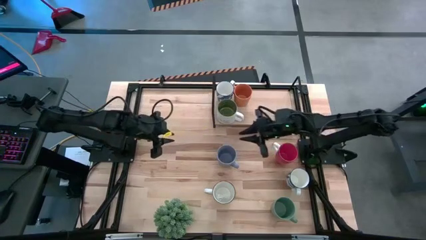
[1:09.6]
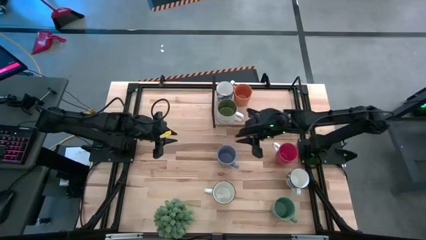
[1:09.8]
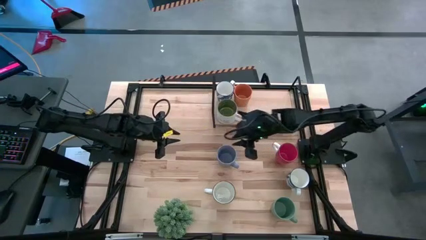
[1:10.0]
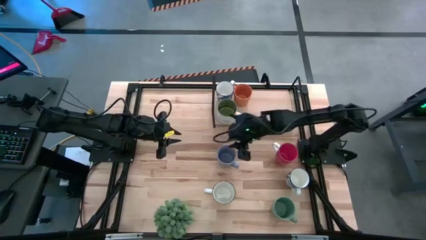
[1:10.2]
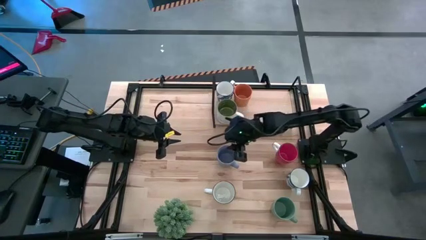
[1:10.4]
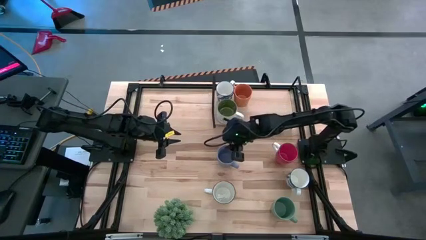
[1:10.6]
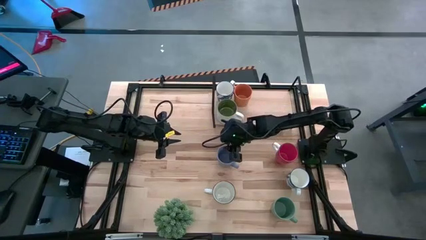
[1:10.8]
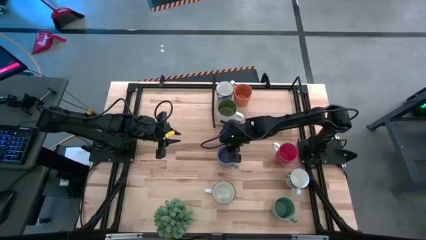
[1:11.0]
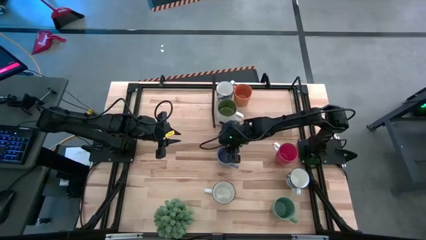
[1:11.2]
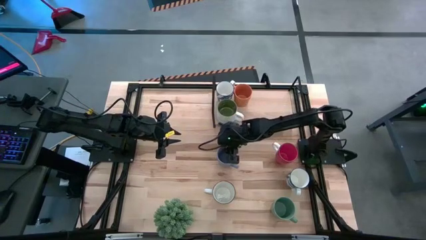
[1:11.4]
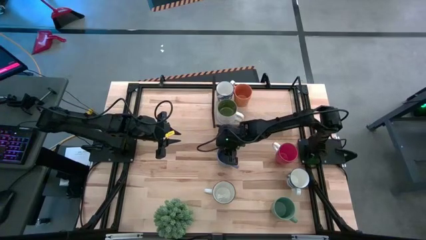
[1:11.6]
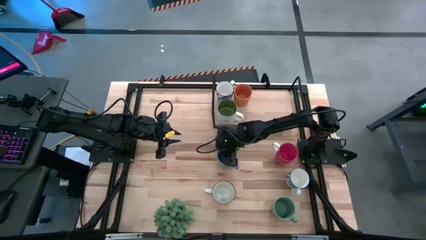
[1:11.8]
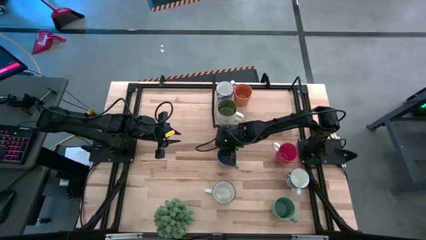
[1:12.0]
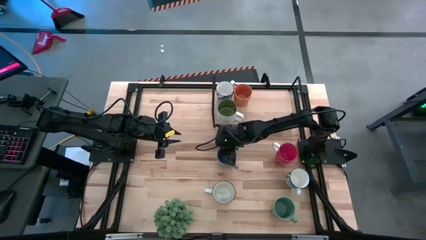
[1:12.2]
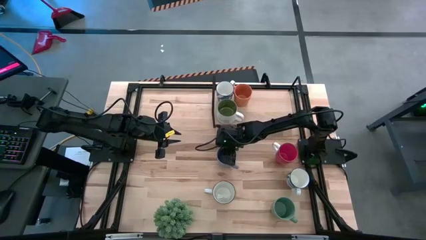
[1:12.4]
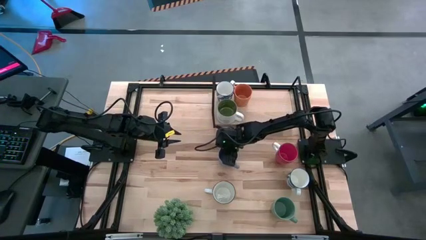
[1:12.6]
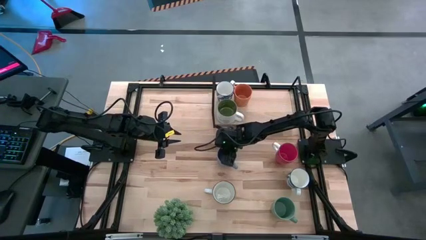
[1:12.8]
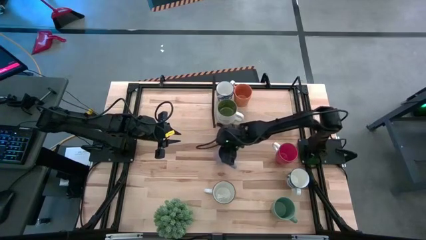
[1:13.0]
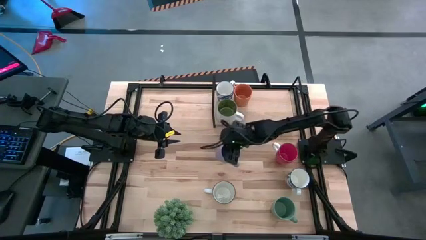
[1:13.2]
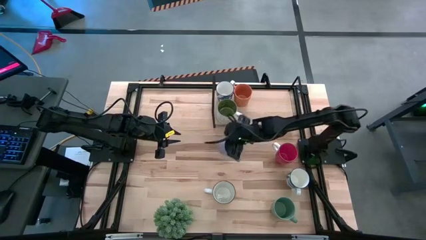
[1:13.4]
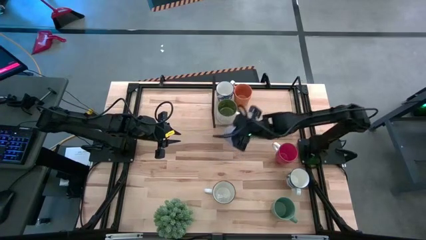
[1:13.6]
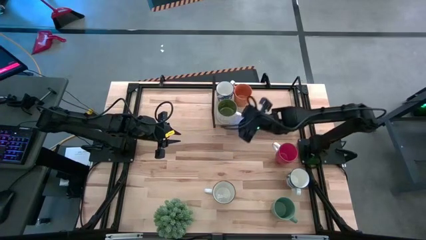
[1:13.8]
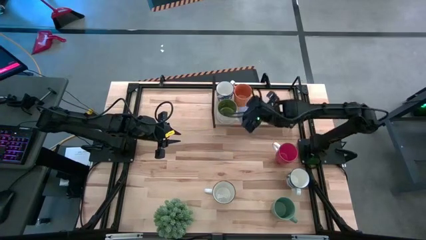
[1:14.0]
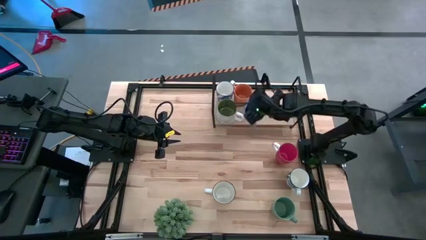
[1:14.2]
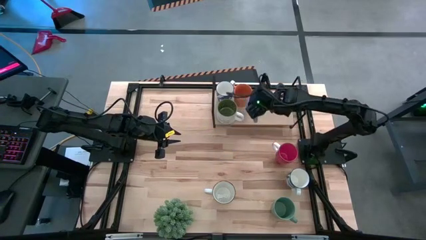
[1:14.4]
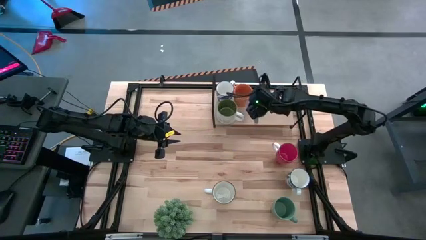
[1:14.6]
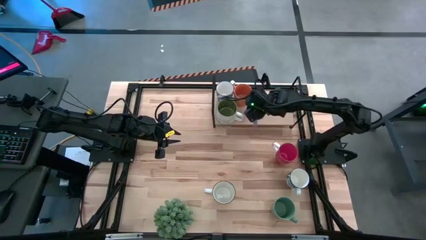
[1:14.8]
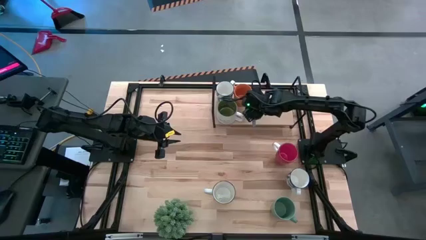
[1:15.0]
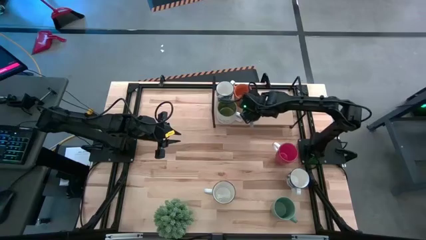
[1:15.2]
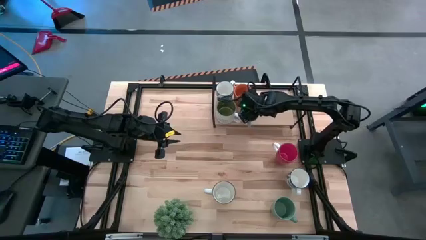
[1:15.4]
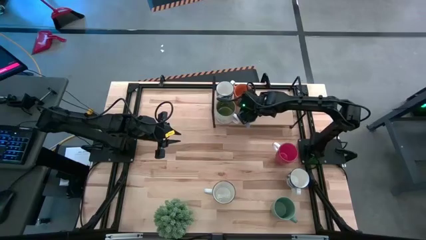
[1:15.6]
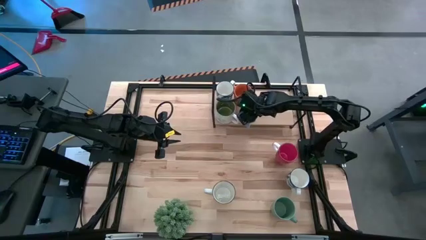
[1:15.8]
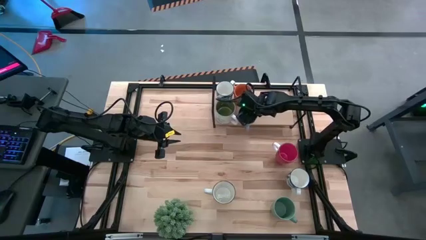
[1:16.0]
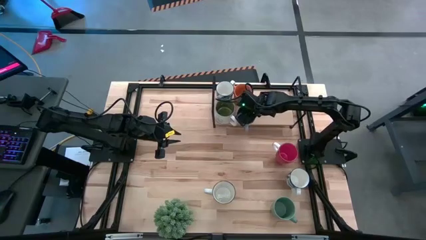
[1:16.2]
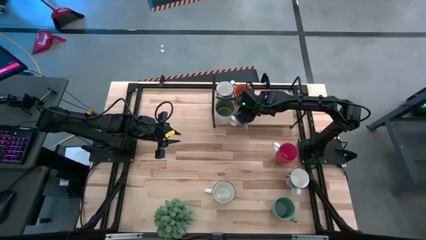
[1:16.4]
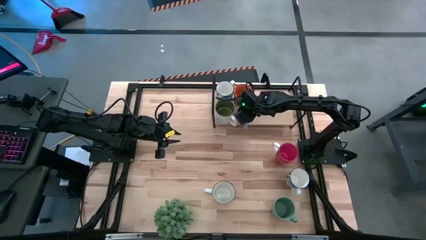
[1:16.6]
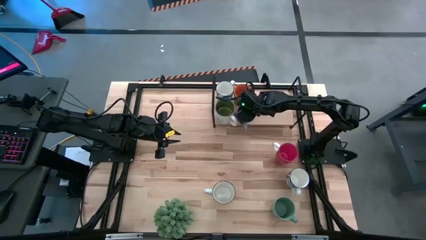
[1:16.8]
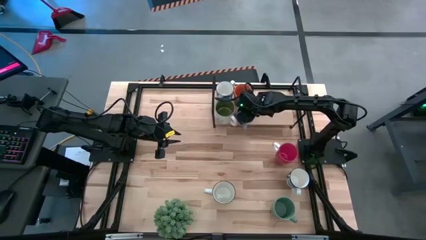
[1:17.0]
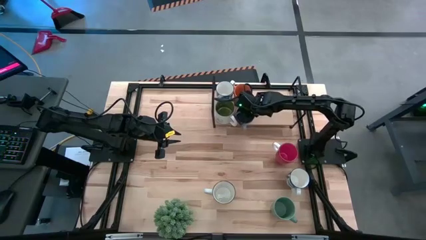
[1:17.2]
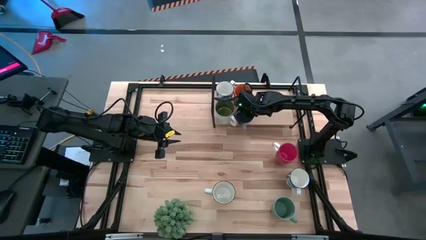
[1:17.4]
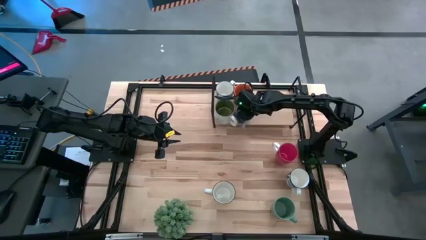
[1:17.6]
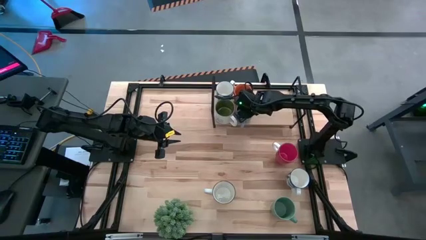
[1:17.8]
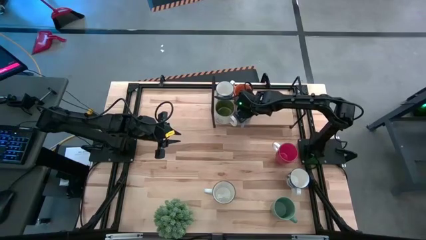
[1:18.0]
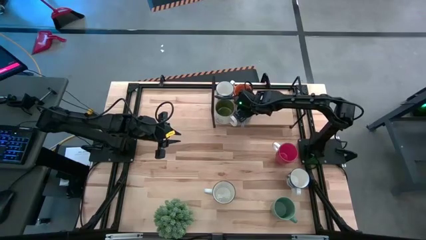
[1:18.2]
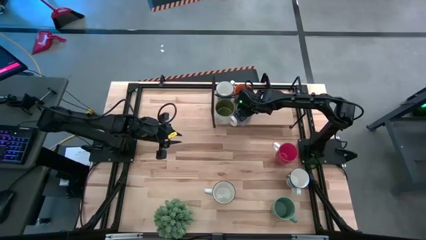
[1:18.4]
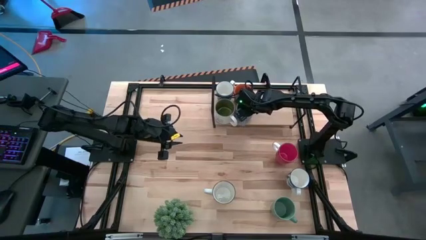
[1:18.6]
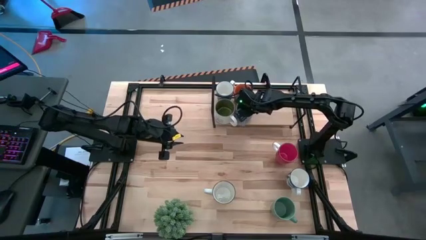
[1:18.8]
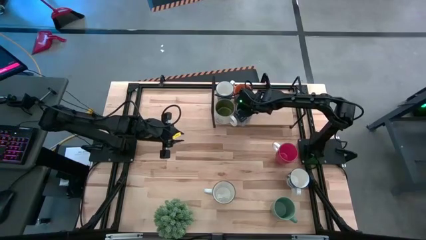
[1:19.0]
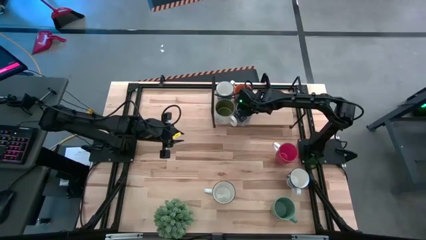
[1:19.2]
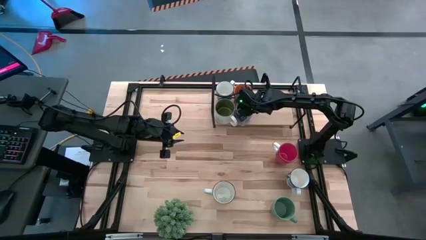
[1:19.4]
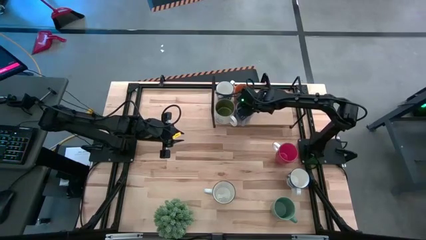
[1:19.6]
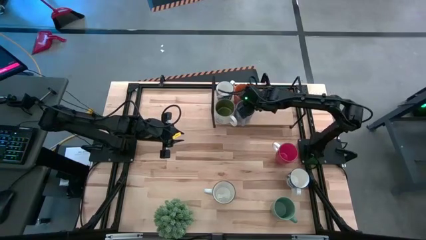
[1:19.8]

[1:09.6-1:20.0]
Task: Place coffee mugs
Put the blue mug on the shelf

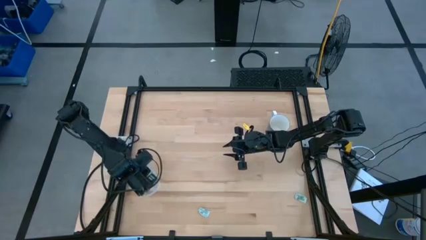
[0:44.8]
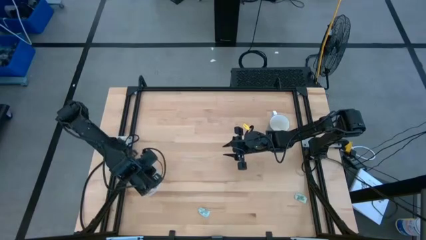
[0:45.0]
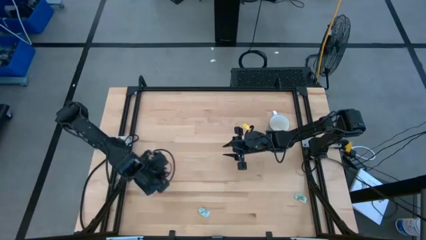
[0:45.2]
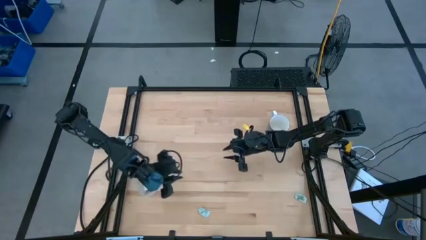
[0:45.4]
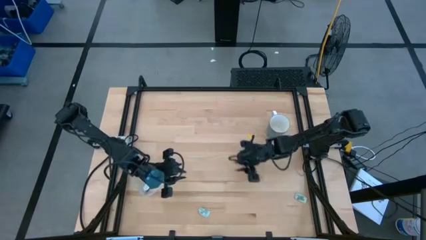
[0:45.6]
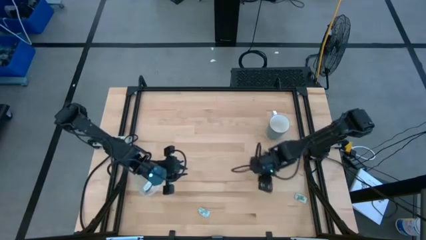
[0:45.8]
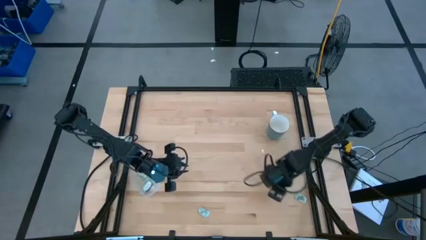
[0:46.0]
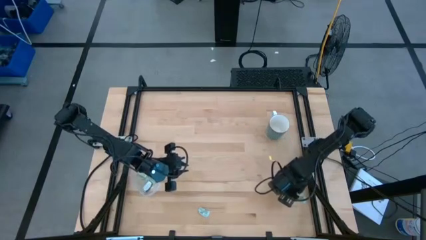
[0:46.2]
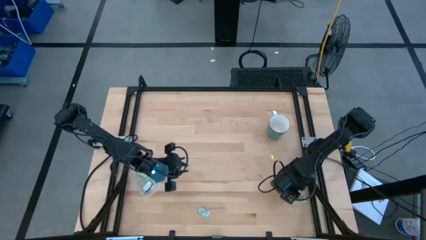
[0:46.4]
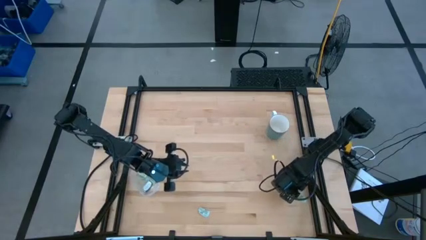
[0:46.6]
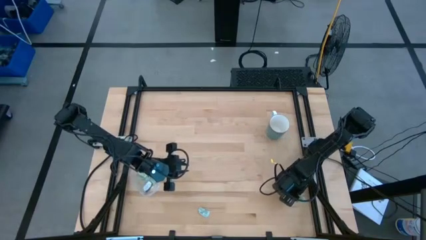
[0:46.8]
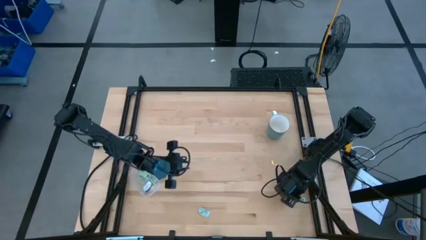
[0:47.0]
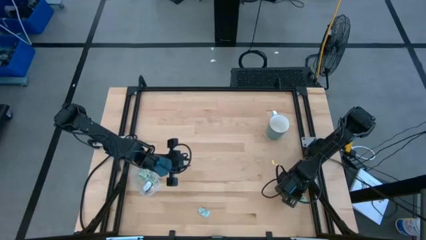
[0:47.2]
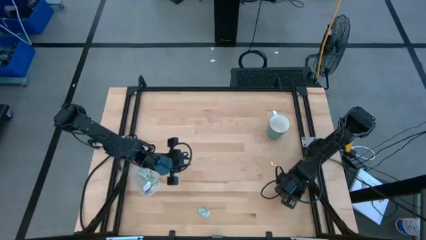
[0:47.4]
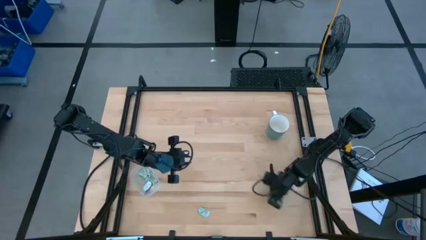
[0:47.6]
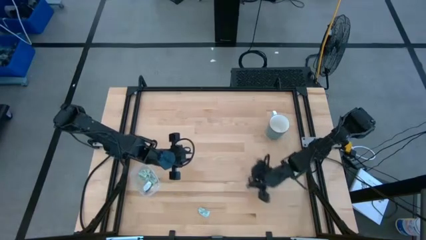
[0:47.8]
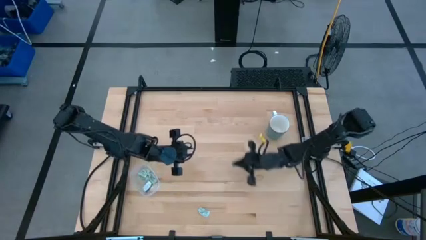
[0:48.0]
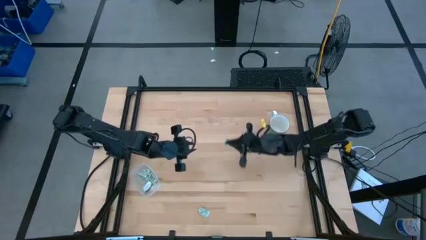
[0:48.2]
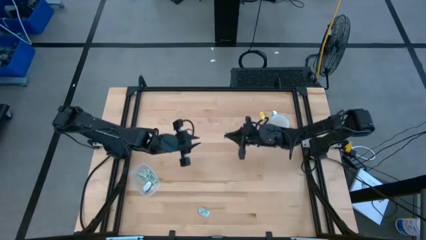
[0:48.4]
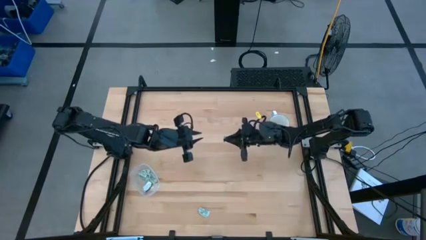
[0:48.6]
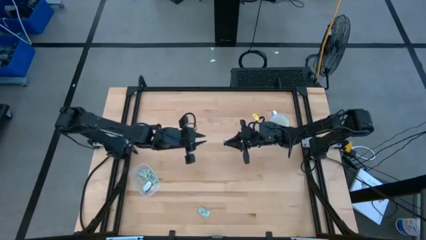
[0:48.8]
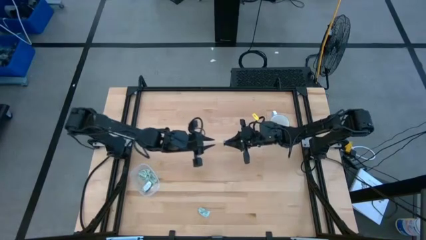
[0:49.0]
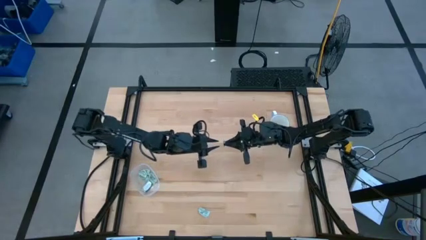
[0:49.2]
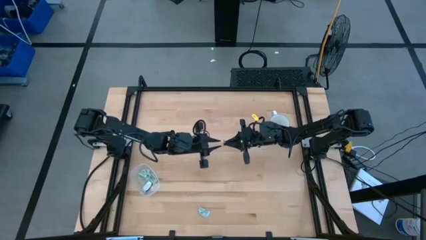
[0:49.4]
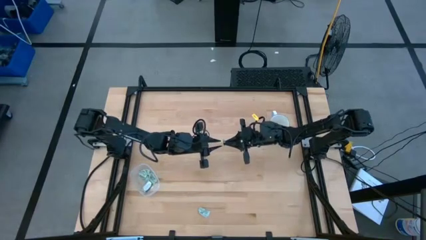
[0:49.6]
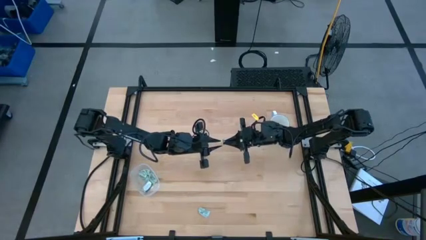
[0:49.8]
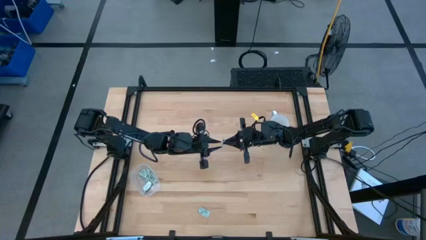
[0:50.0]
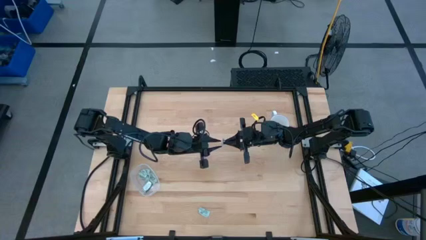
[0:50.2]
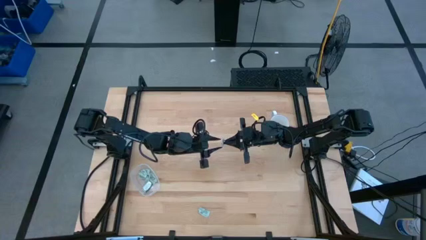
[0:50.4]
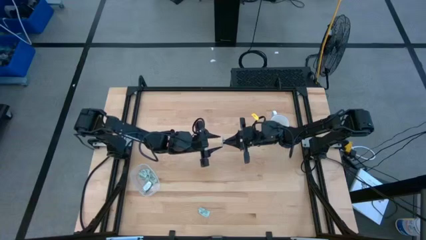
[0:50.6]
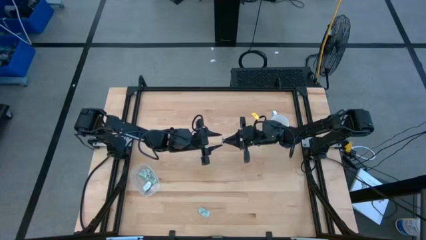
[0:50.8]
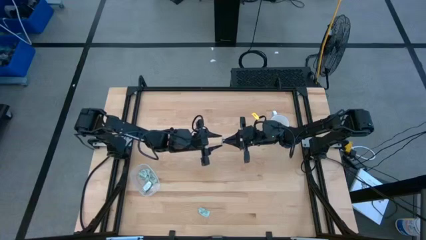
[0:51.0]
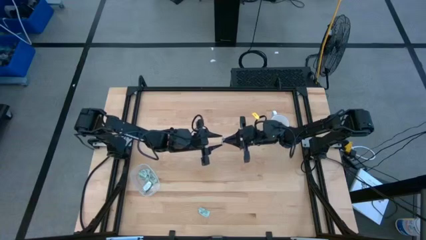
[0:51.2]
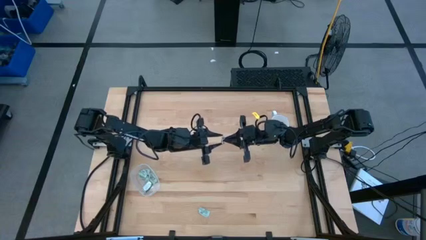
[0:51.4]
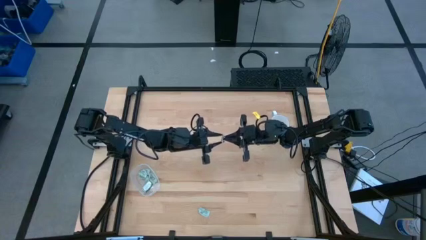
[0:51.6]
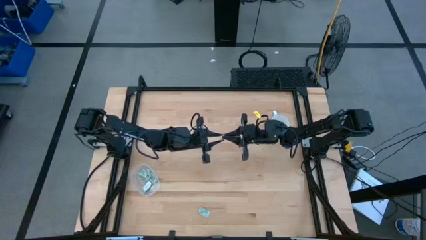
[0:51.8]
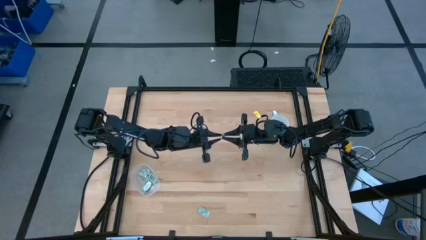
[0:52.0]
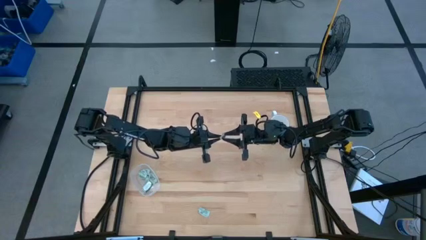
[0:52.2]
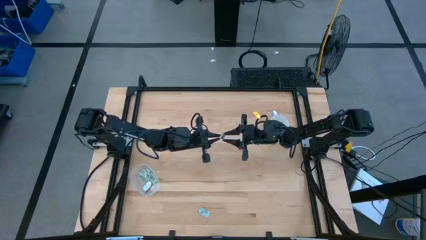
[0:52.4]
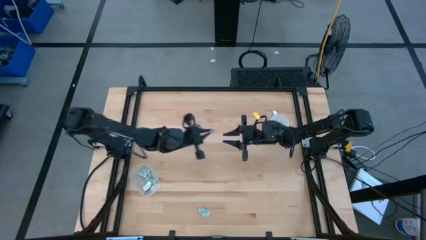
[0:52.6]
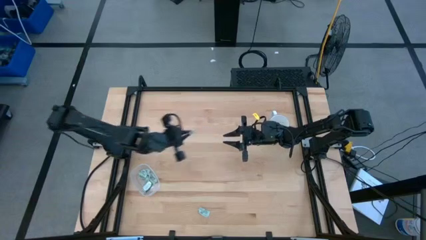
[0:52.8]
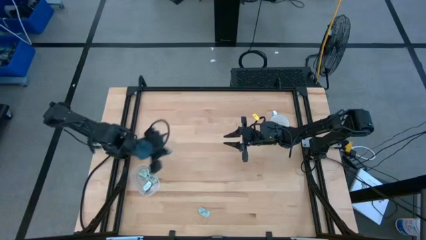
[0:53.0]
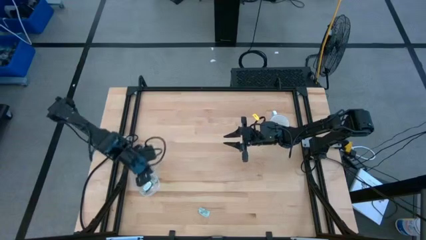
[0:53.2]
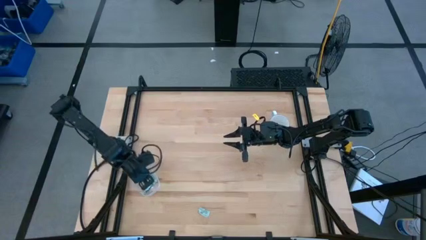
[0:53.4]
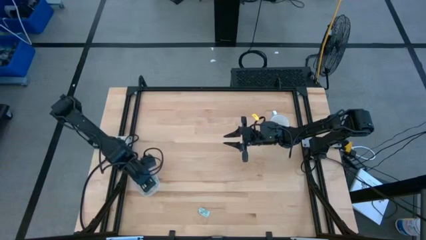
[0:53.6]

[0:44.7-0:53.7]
Task: Pick and place Stevia / Truvia into bins
Put the stevia packet into the transparent container
